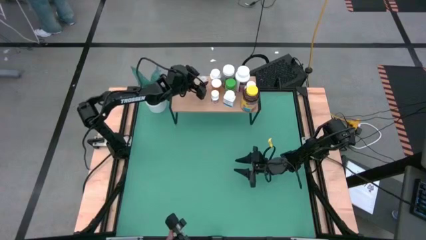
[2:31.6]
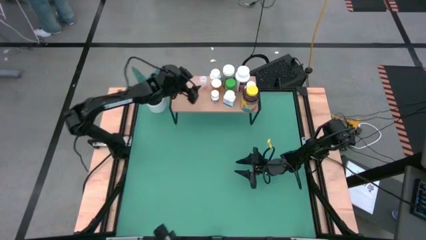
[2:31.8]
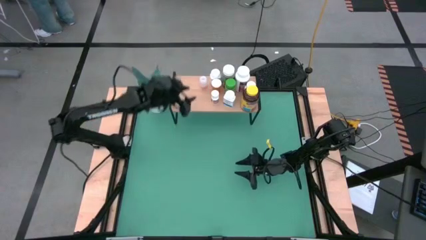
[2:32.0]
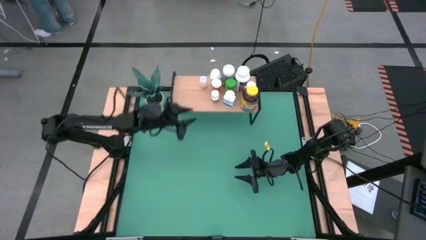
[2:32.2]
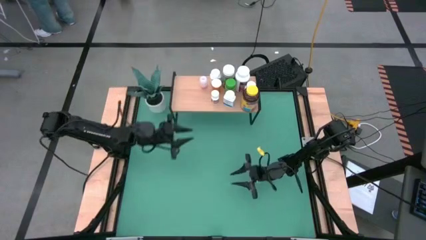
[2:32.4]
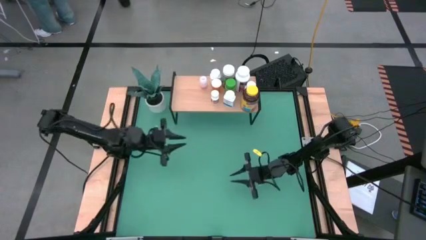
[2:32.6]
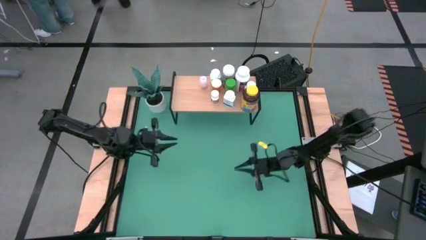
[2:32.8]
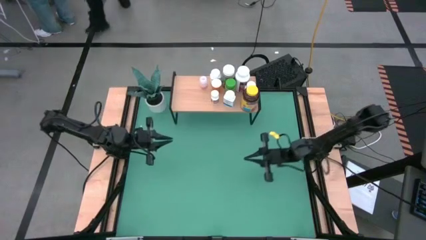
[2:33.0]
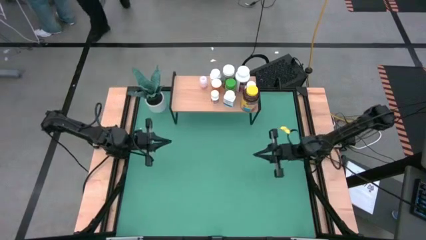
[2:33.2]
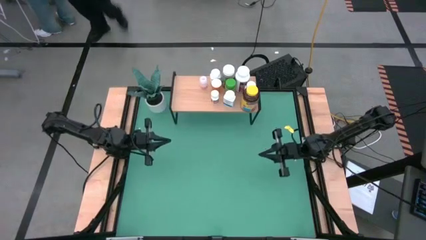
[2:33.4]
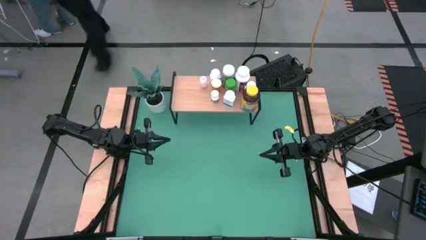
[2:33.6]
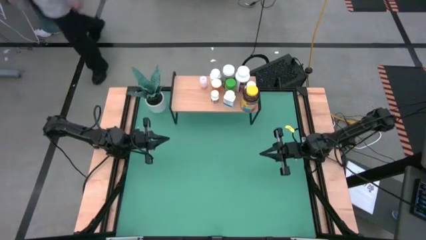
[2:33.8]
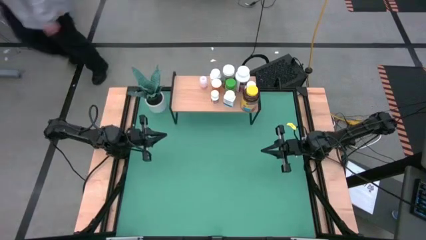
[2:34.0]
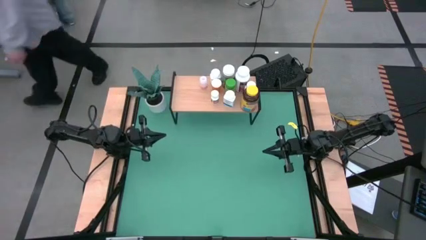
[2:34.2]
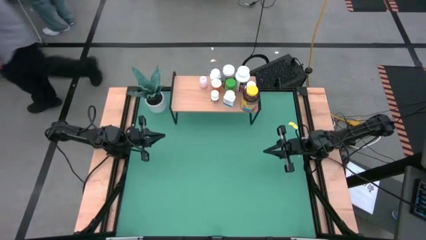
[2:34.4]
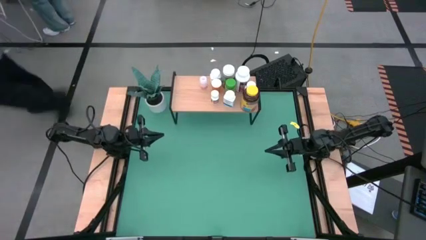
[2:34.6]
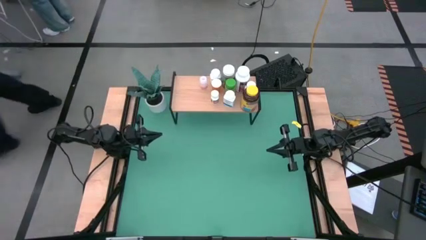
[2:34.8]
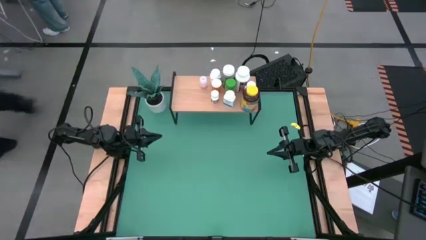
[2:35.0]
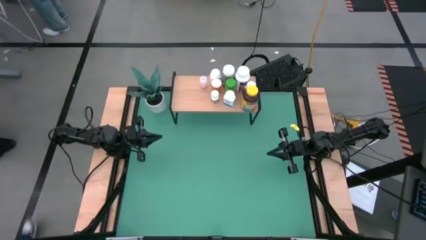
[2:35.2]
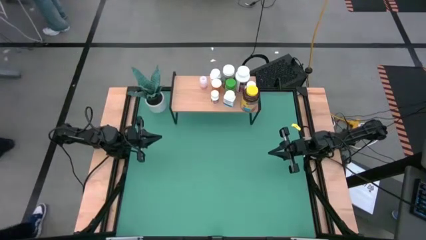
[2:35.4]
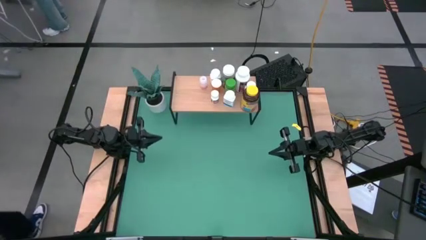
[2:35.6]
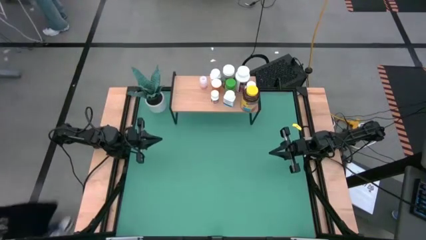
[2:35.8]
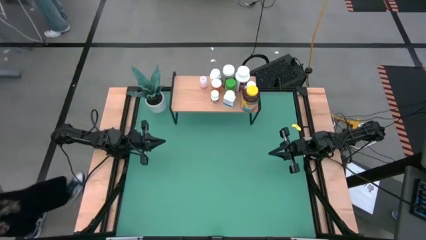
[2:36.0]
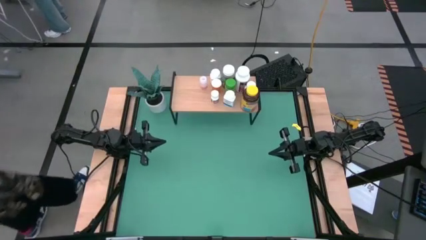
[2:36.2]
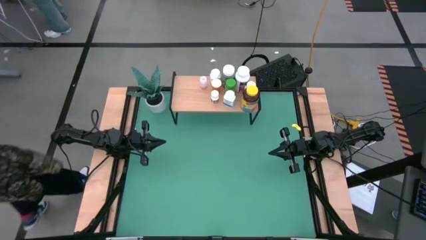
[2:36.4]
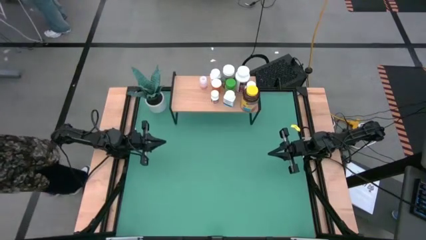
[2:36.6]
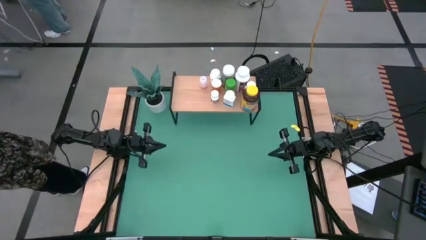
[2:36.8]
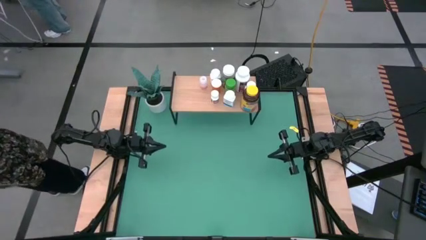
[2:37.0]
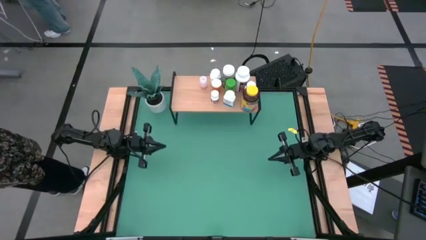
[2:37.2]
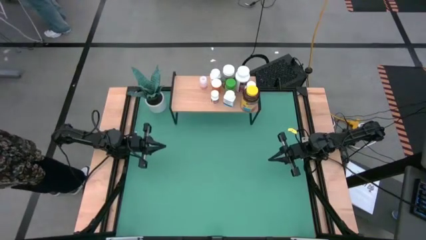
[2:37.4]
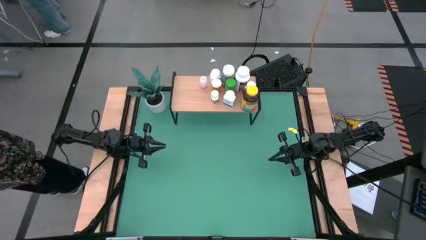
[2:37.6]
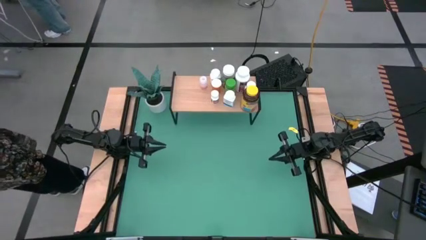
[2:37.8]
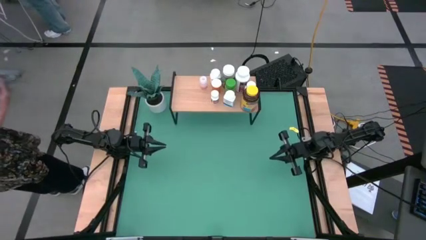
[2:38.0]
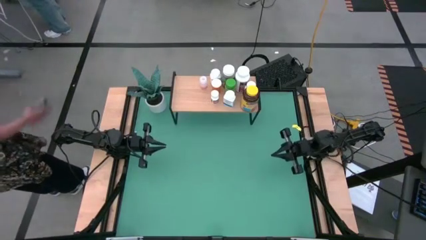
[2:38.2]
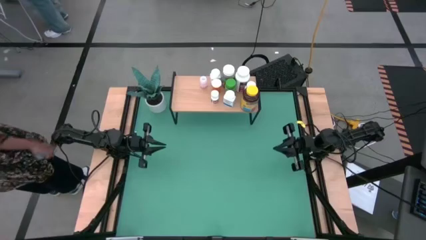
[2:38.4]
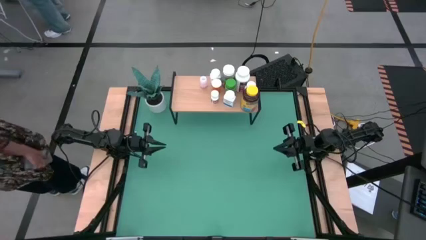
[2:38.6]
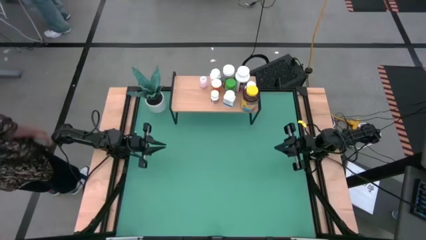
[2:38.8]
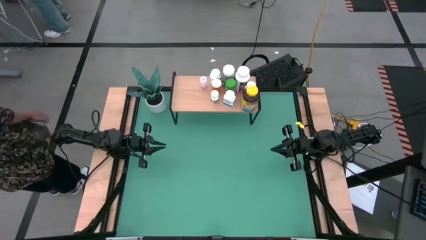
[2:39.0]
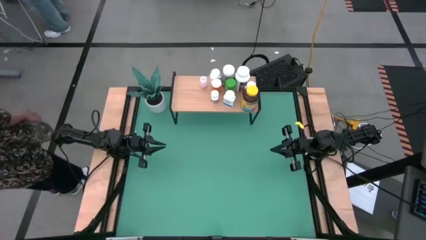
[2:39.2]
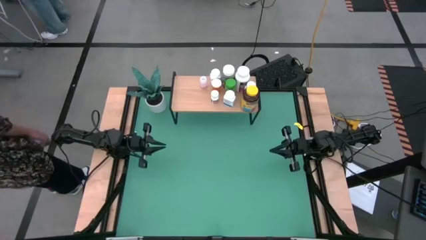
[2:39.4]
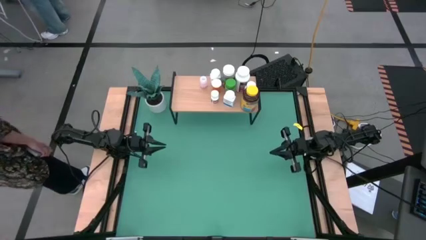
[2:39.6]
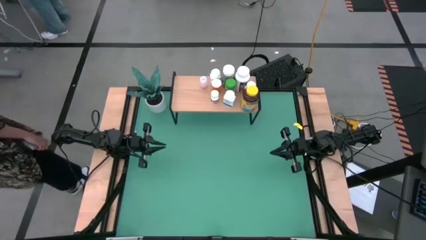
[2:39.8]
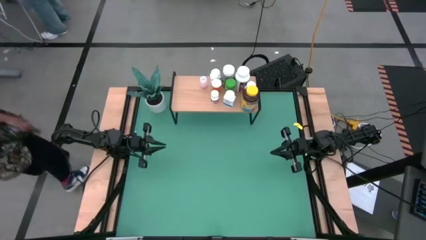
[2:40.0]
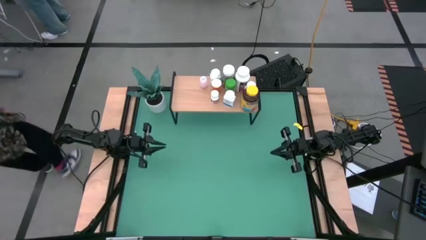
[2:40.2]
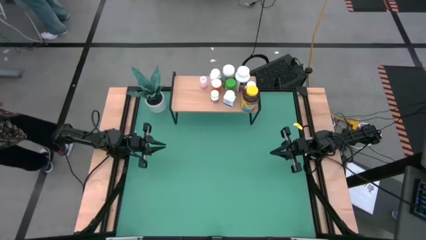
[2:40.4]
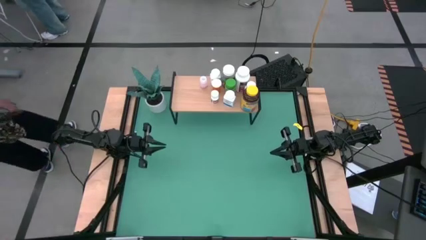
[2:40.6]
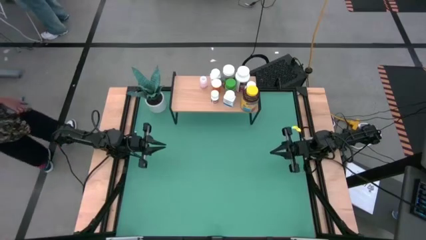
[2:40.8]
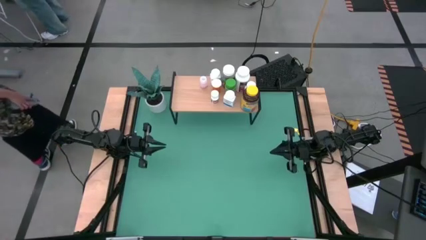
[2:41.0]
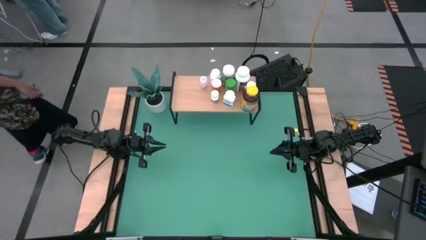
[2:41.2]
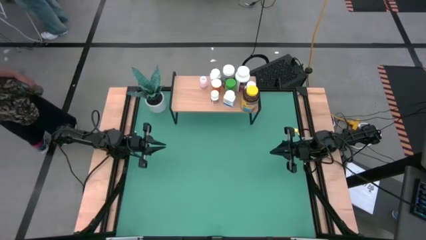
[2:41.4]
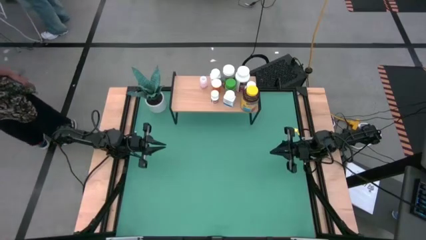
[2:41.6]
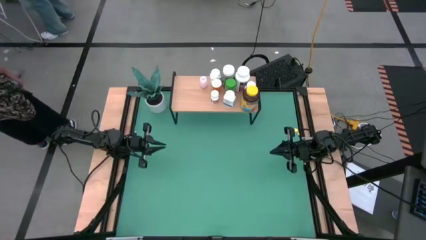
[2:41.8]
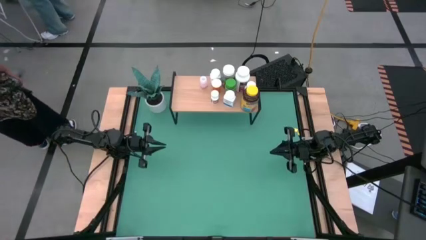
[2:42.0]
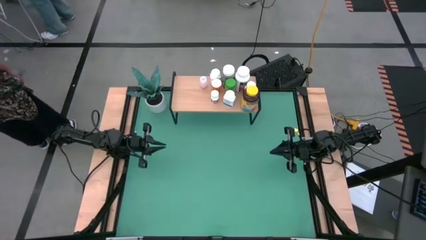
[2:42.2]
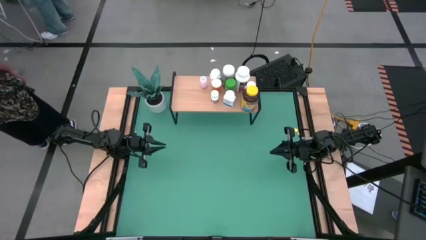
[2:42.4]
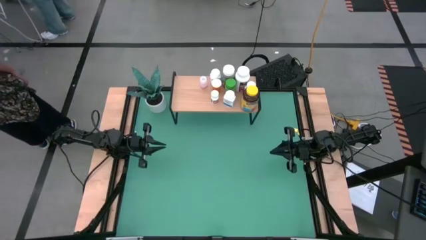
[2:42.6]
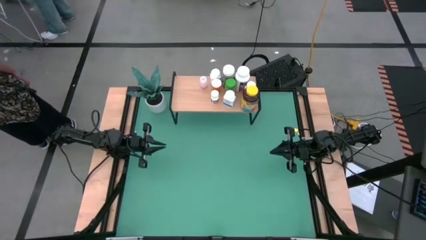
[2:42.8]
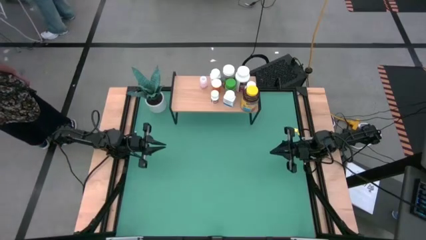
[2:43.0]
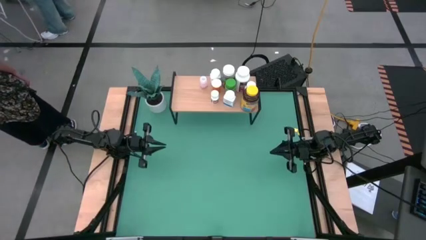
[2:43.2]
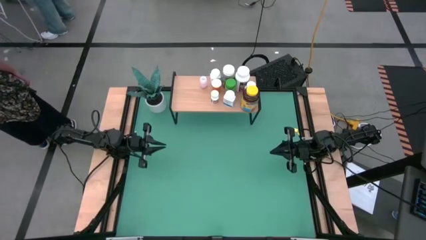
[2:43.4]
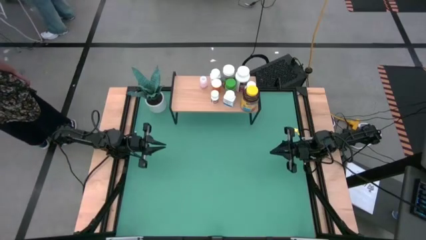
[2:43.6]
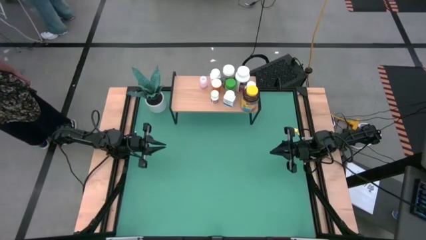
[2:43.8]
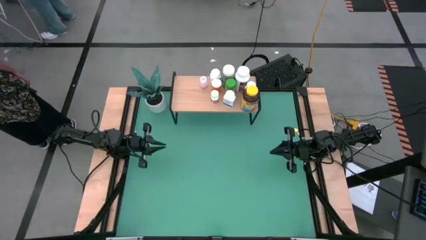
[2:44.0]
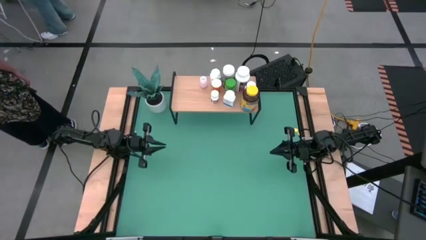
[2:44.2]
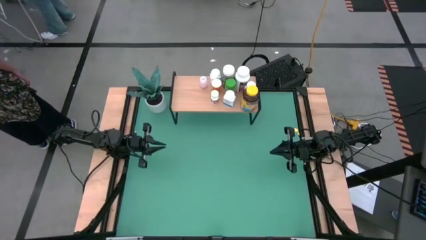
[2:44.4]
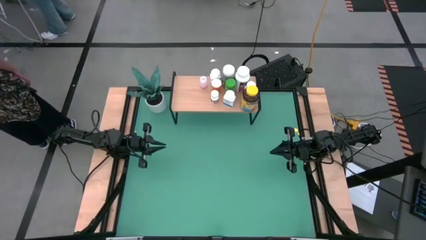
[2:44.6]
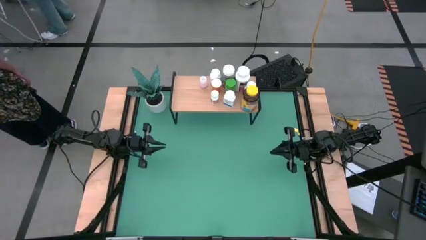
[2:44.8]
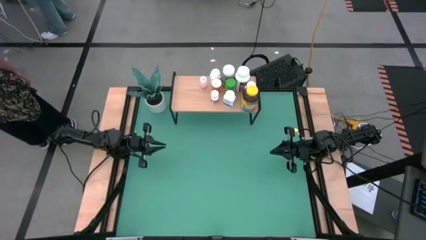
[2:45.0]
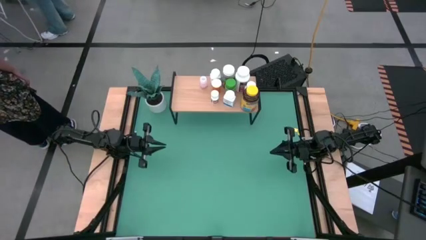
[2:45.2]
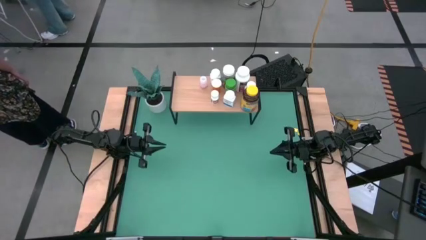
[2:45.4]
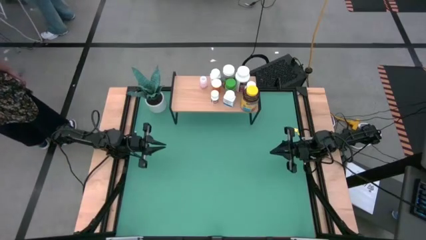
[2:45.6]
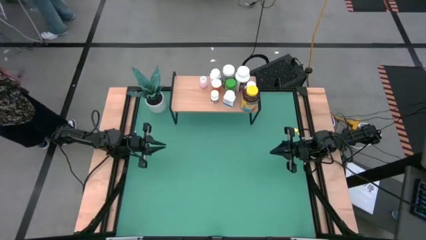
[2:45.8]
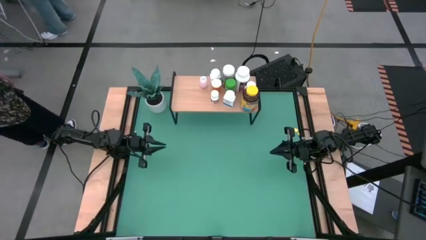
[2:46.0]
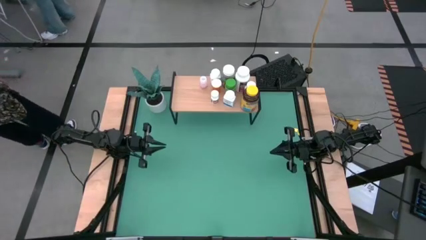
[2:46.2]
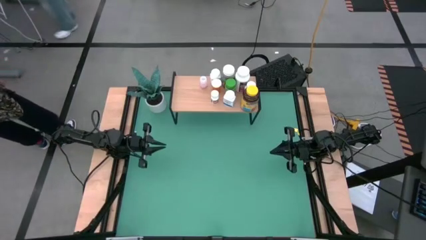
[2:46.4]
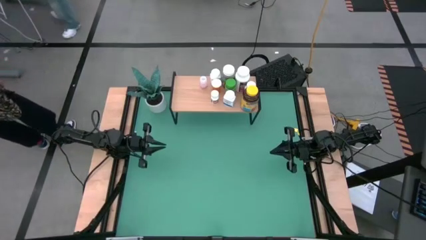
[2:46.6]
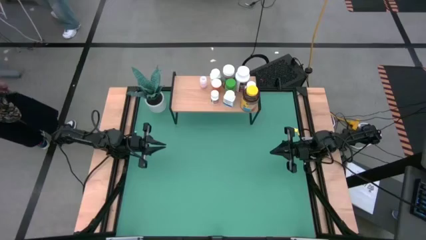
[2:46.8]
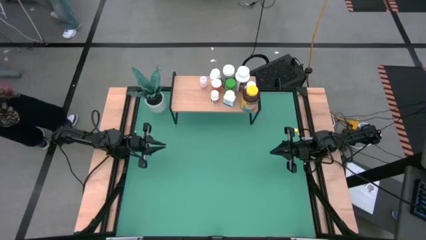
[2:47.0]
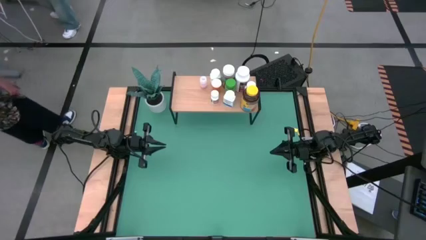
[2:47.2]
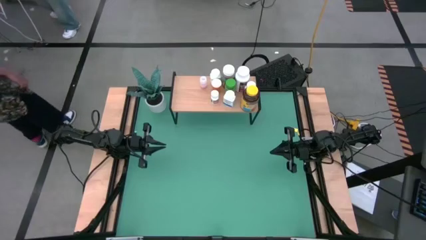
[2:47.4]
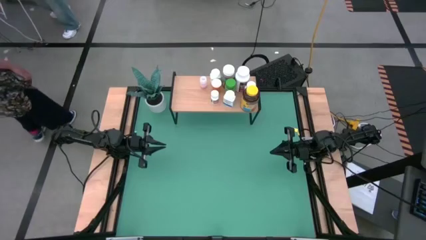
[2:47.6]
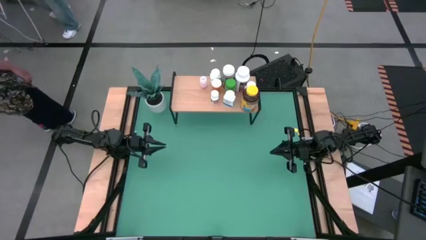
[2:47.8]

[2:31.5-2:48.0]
Task: Pick and place medicine bottles onto shelf by color
Return to Home Position
